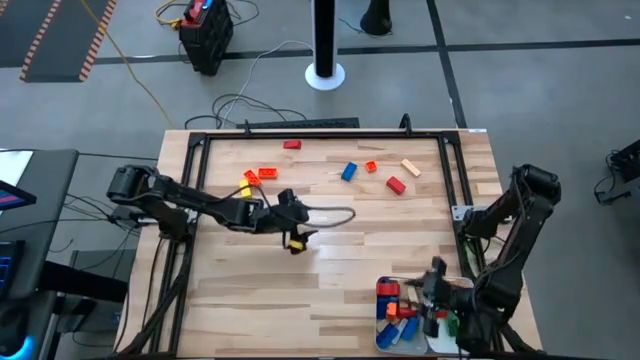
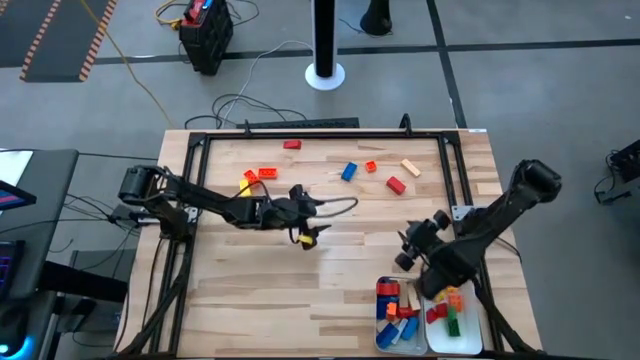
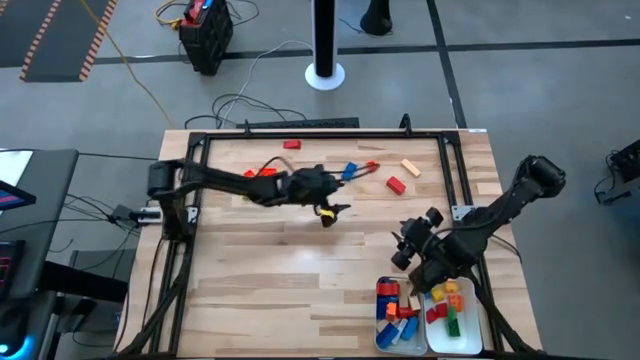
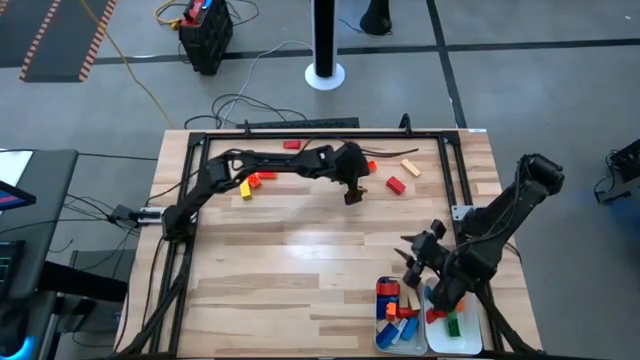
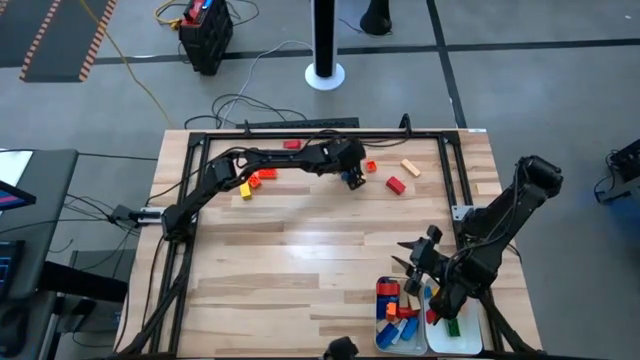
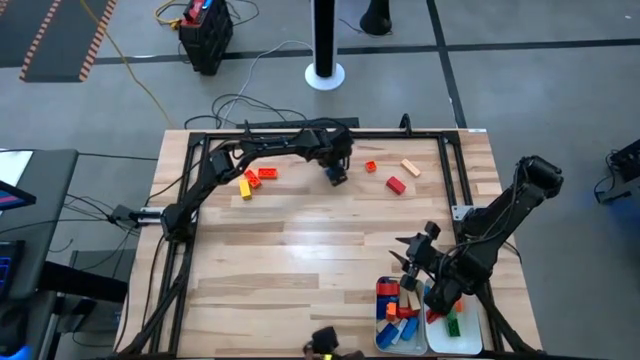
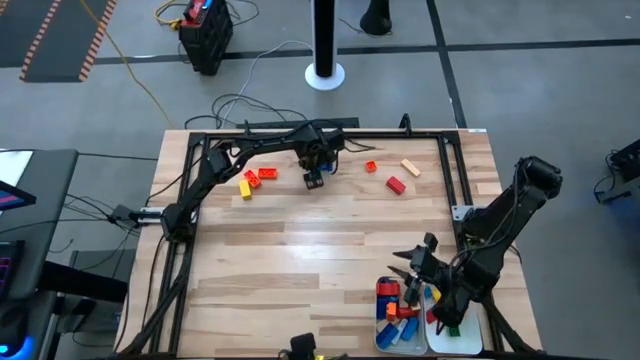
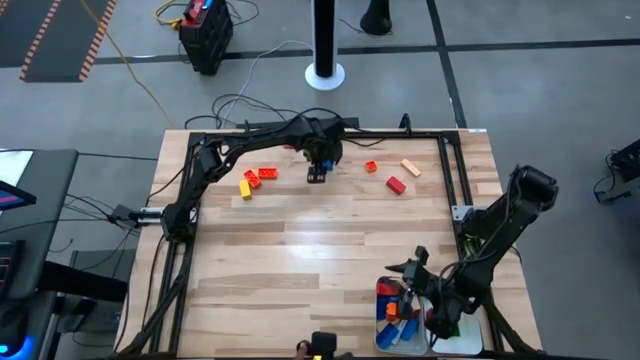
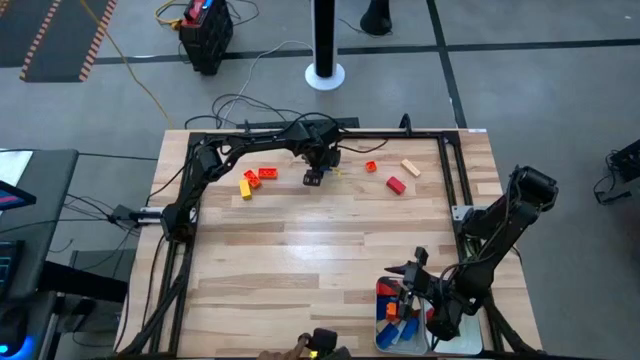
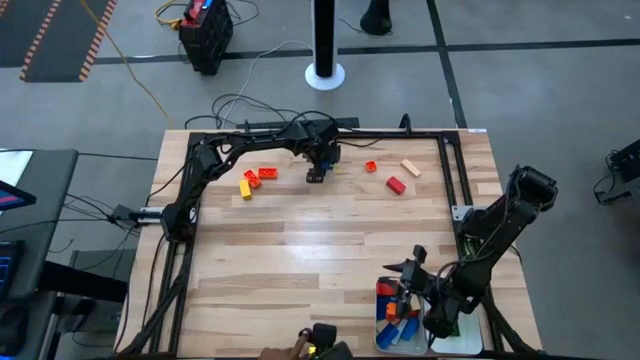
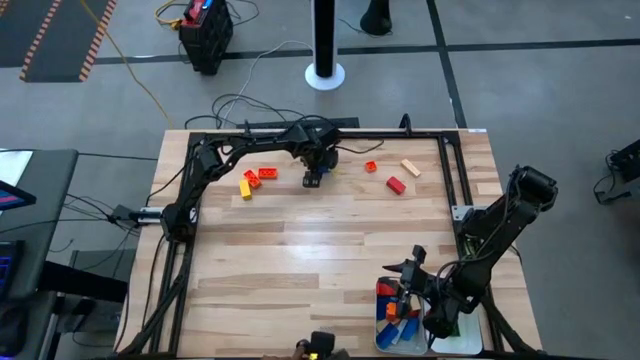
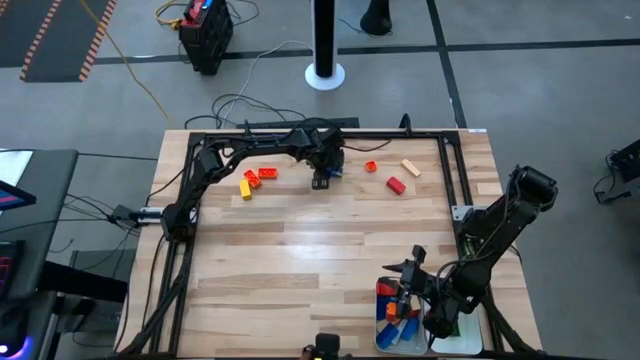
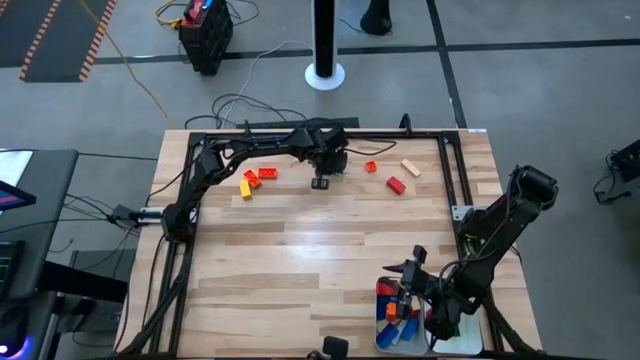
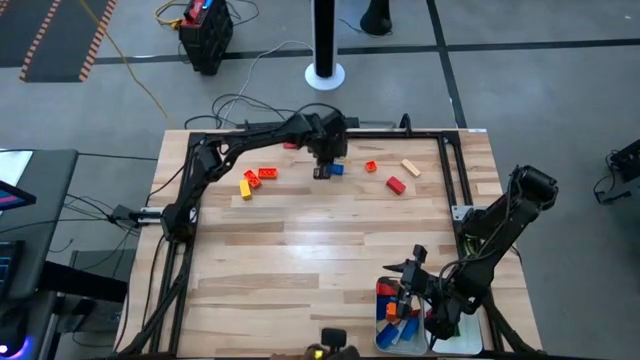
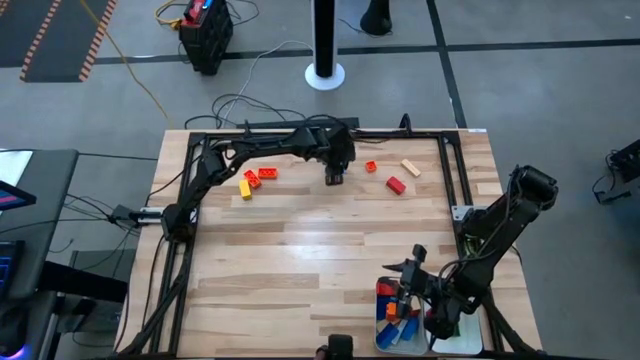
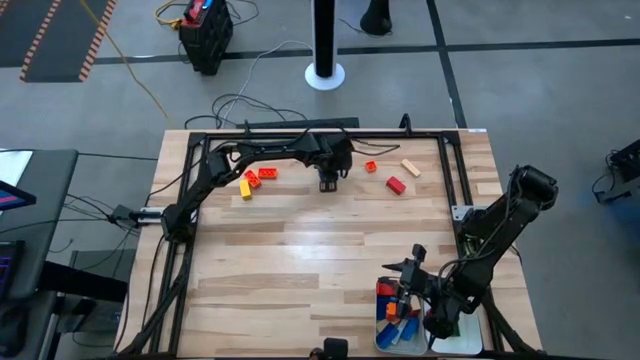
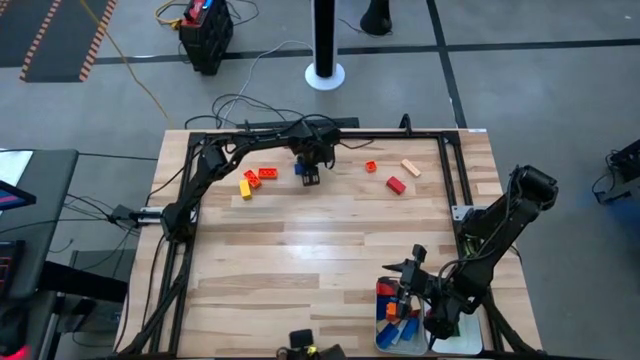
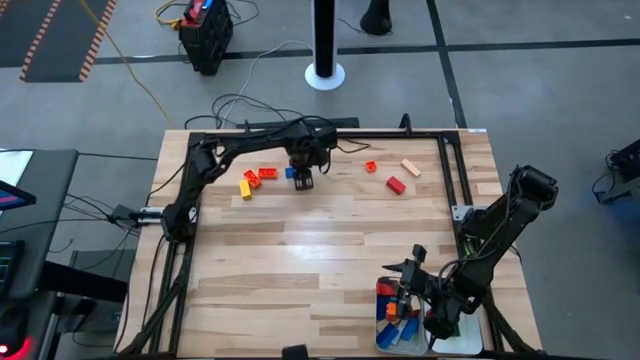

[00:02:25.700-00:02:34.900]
Task: Sort blocks by size
Put the large blue wooden block into the gray bin

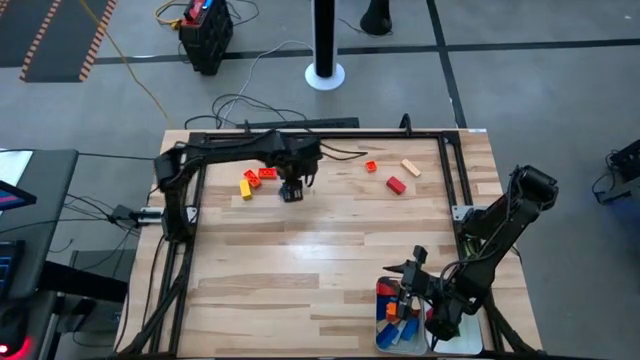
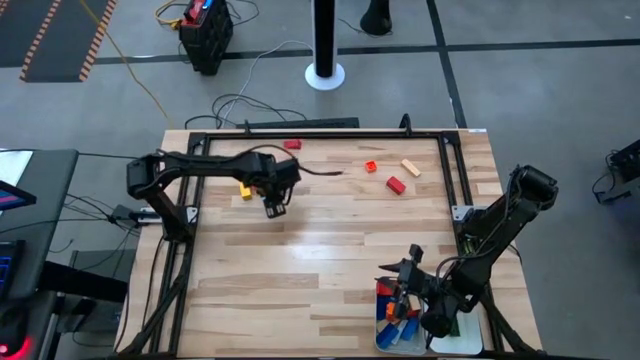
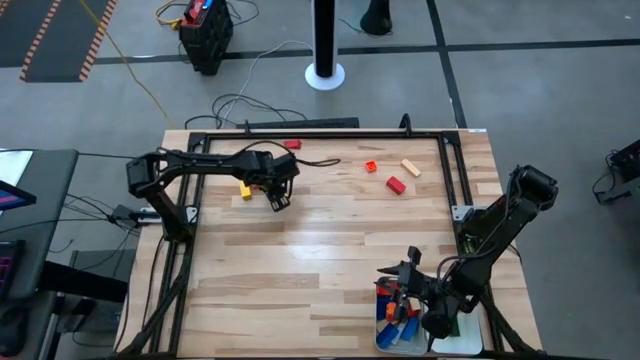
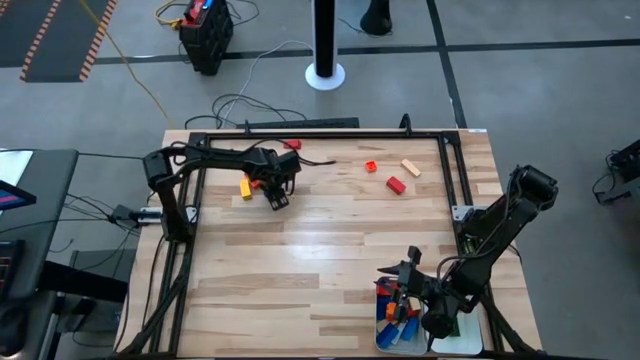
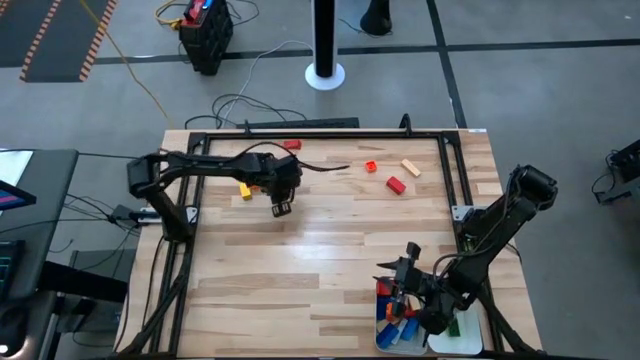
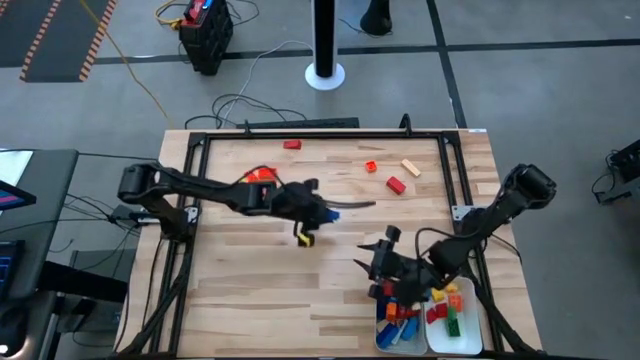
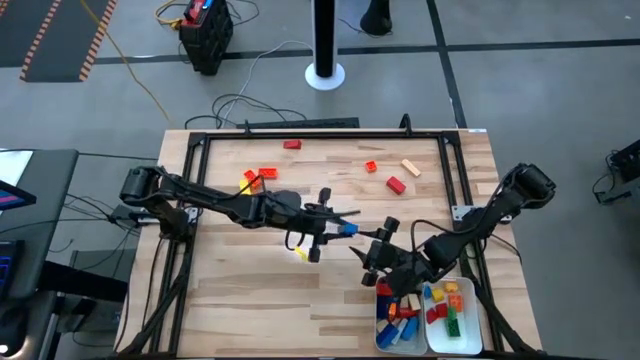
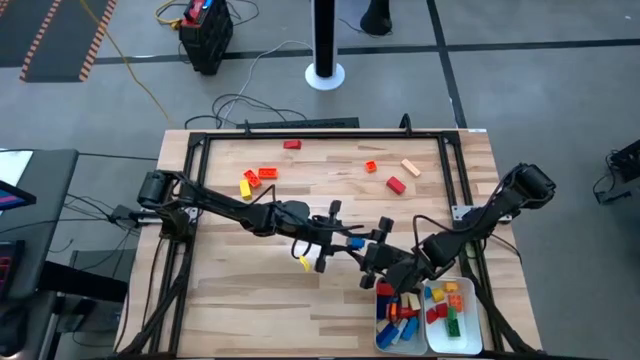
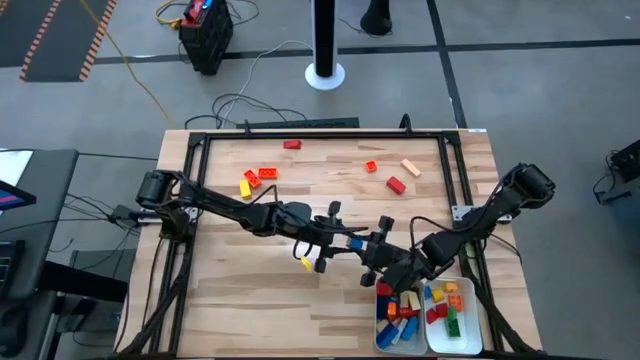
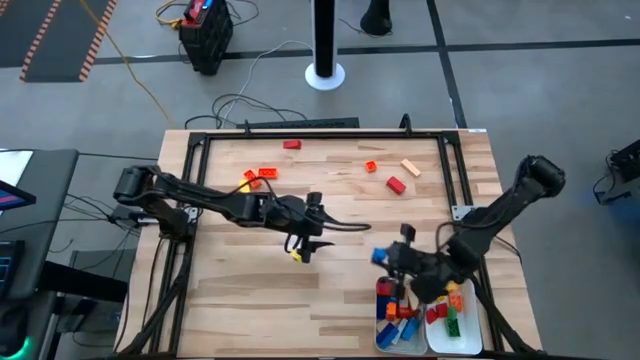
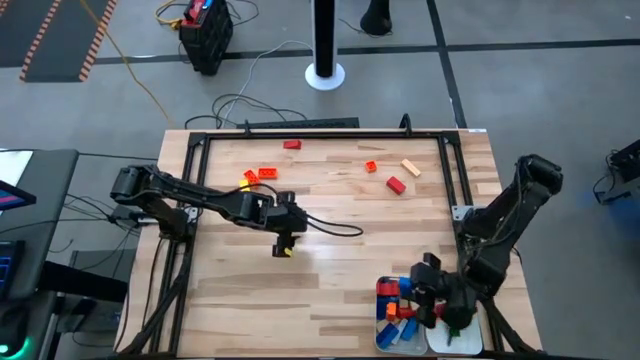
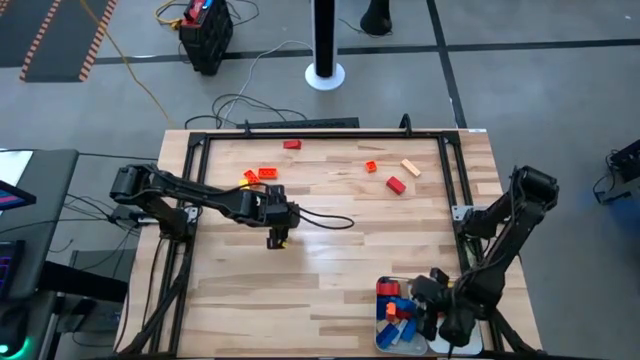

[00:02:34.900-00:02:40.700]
Put the large blue wooden block into the gray bin

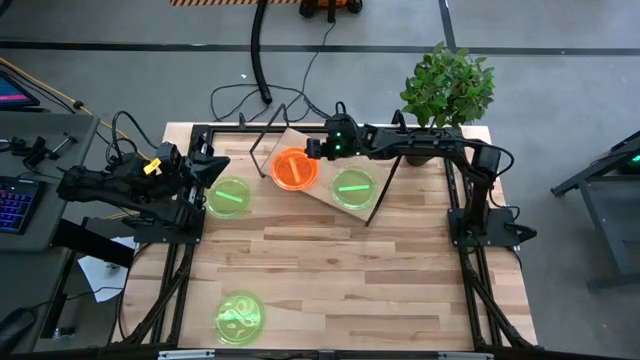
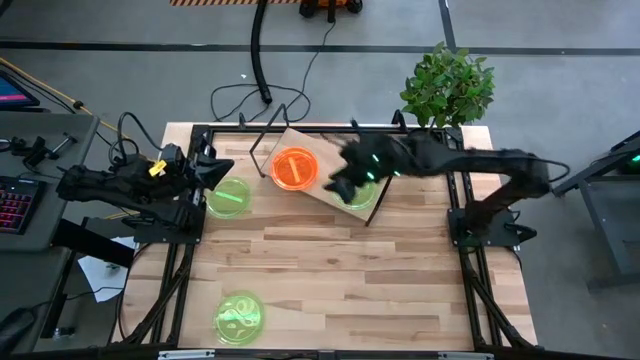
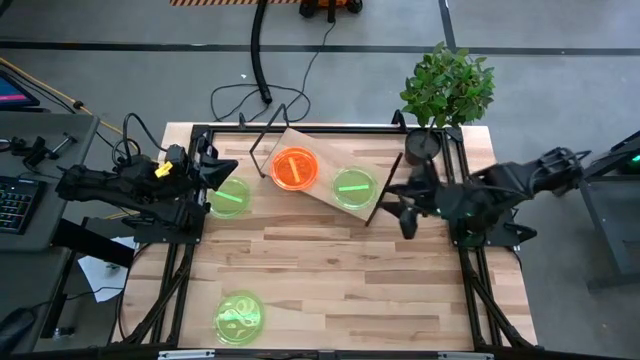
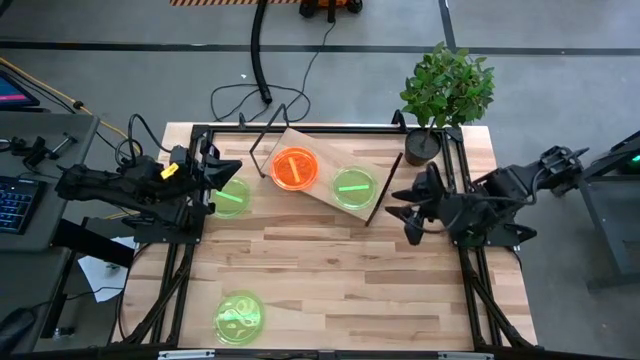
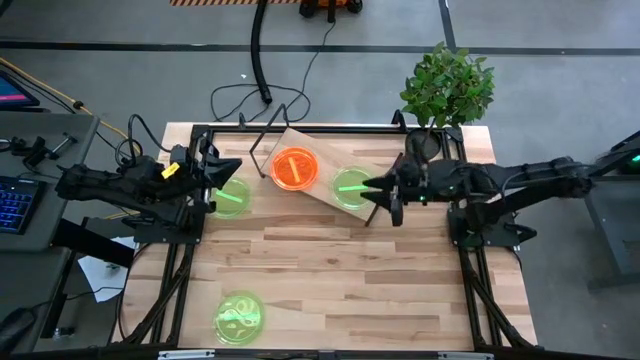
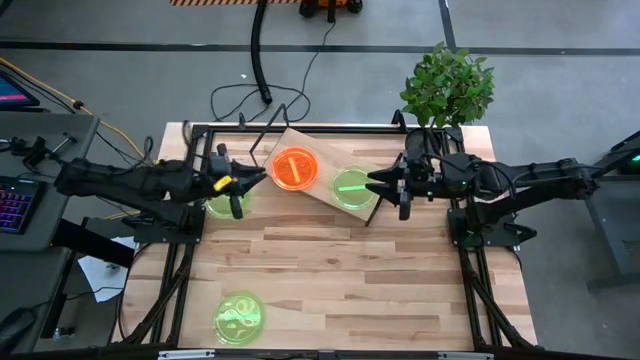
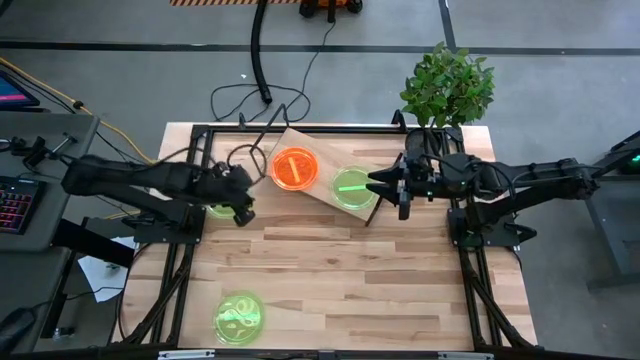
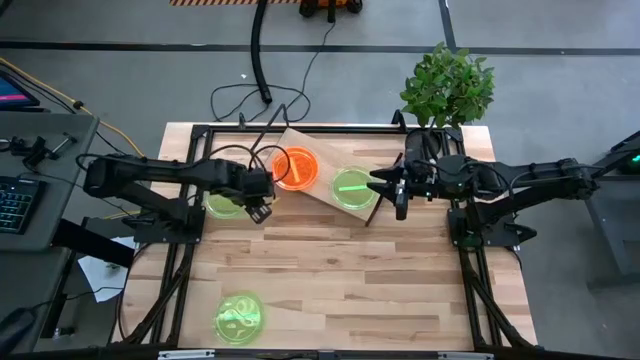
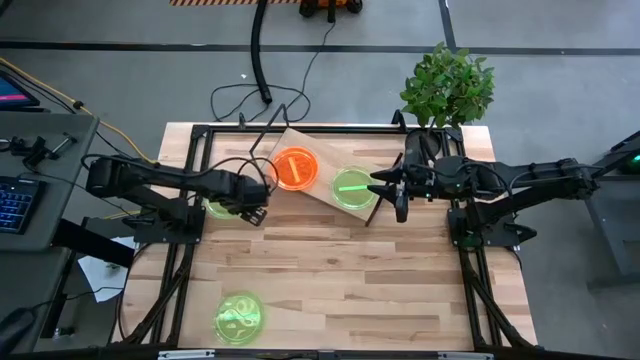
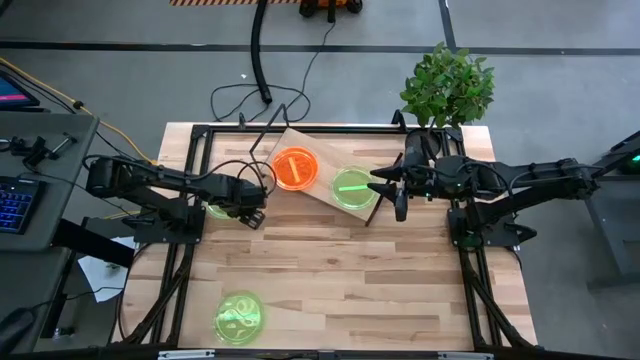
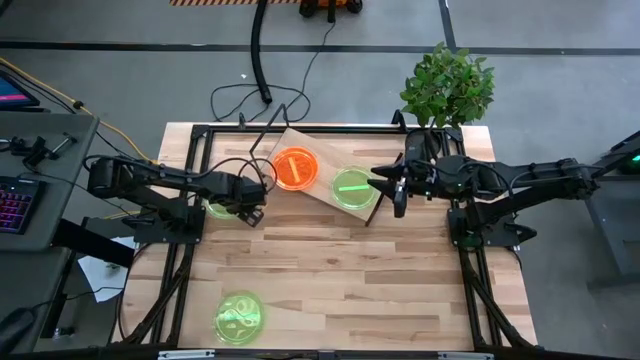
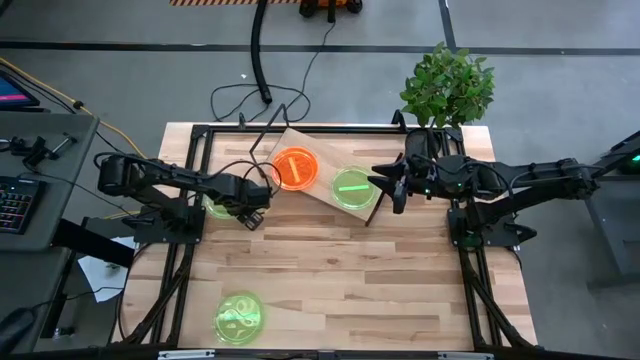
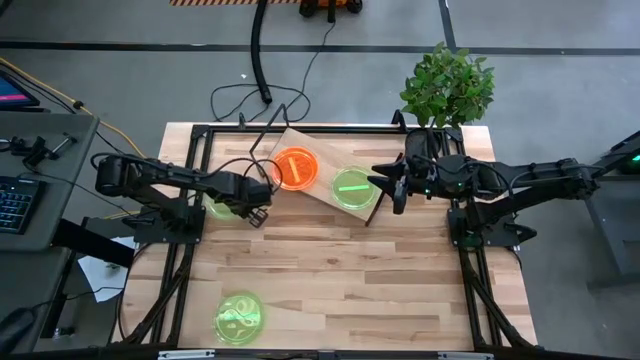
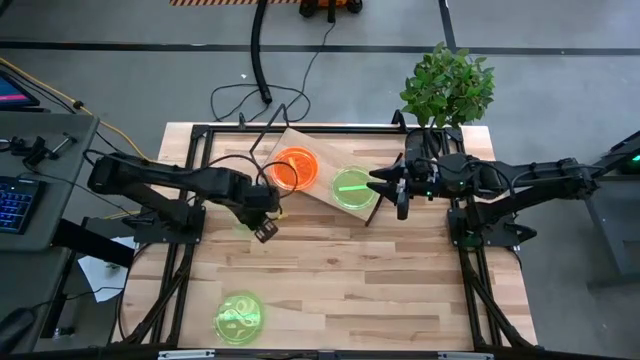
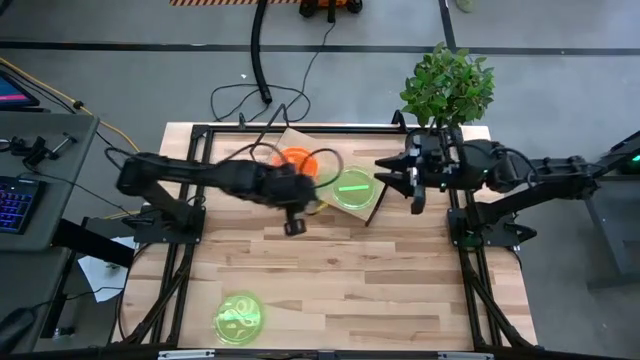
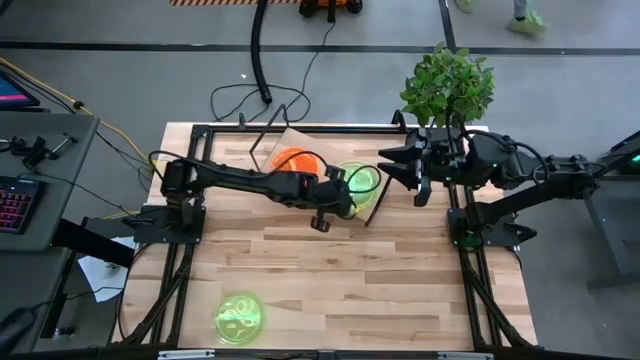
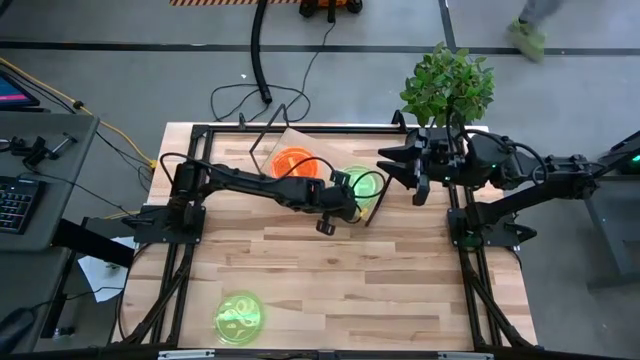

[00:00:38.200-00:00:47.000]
Task: Place and stack plates onto a shelf
Stack the top green plate on top of the green plate on the shelf
